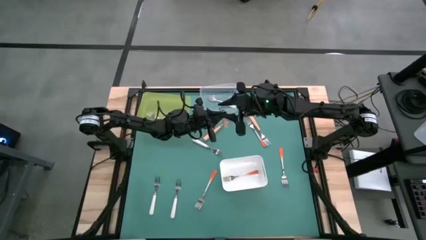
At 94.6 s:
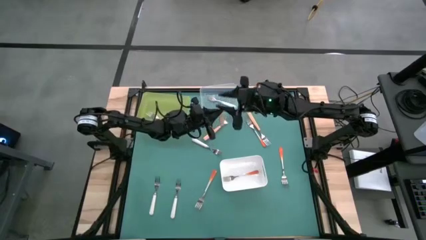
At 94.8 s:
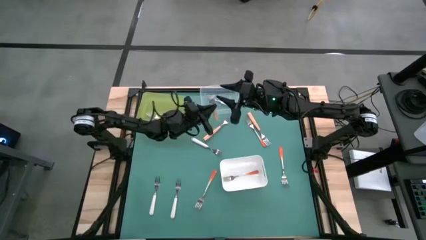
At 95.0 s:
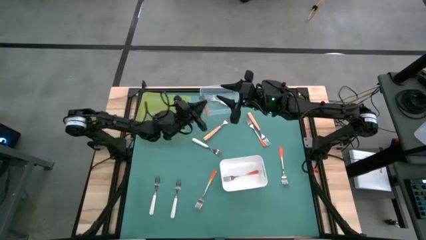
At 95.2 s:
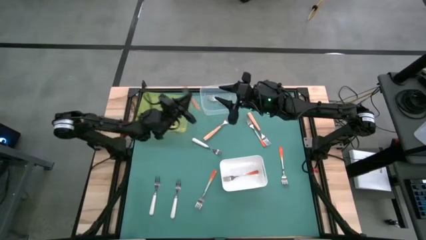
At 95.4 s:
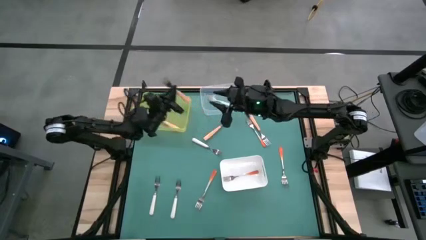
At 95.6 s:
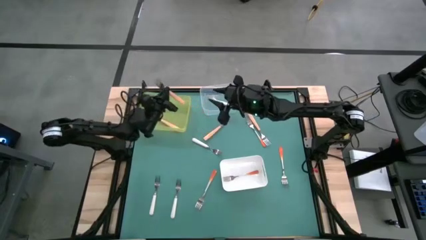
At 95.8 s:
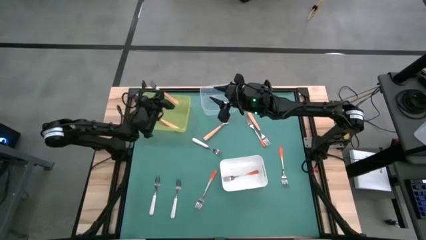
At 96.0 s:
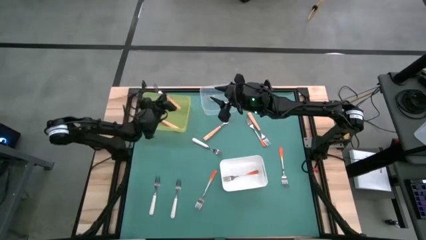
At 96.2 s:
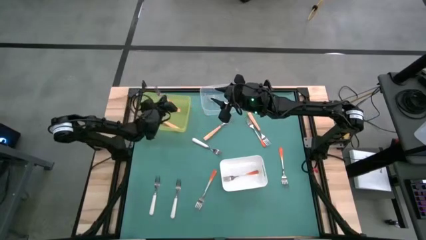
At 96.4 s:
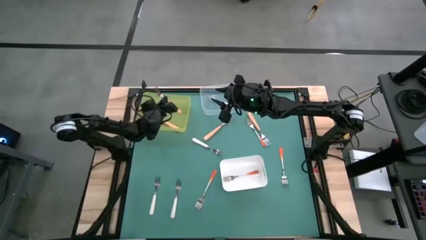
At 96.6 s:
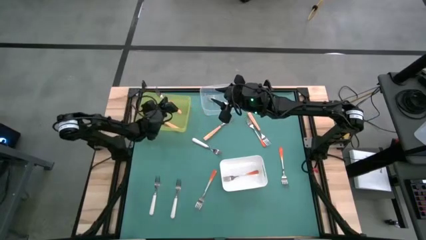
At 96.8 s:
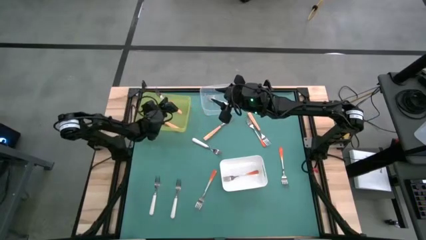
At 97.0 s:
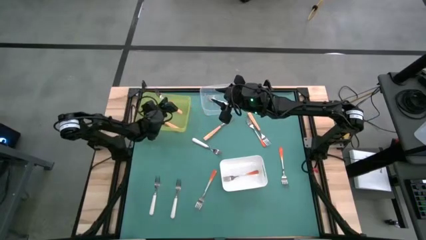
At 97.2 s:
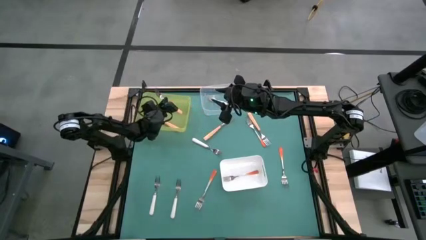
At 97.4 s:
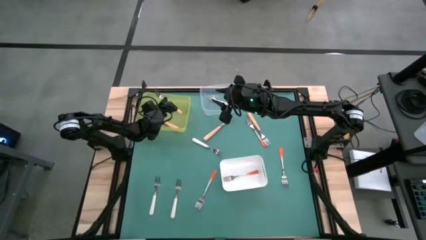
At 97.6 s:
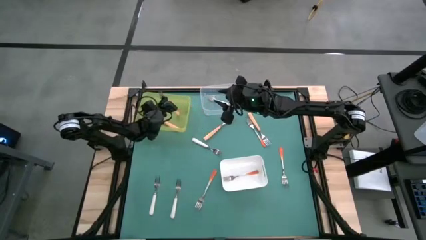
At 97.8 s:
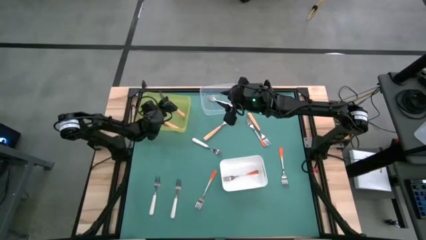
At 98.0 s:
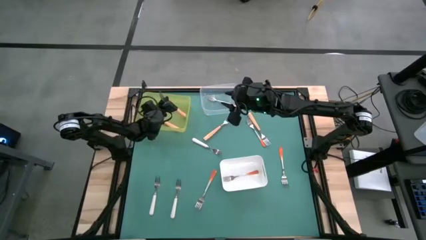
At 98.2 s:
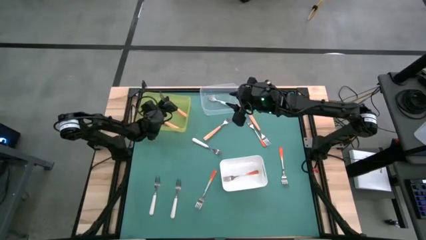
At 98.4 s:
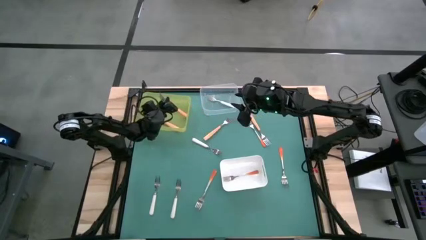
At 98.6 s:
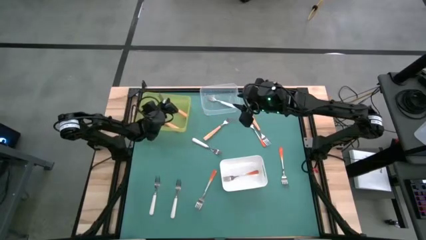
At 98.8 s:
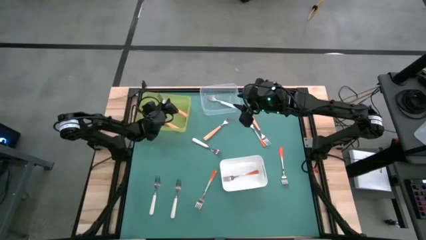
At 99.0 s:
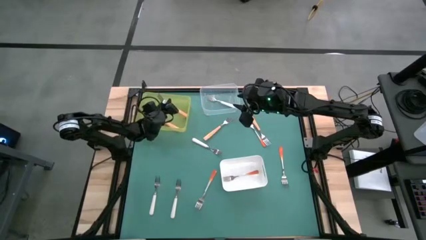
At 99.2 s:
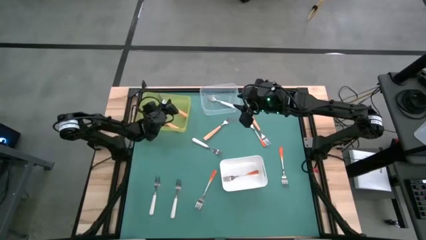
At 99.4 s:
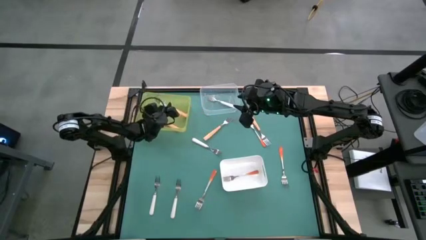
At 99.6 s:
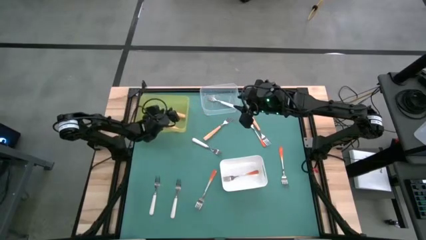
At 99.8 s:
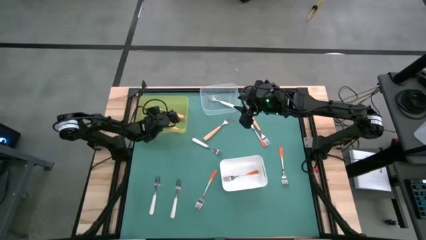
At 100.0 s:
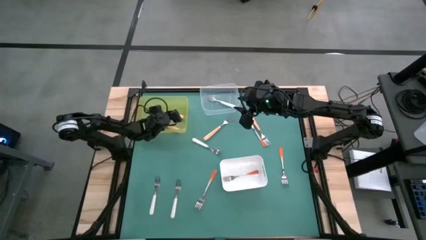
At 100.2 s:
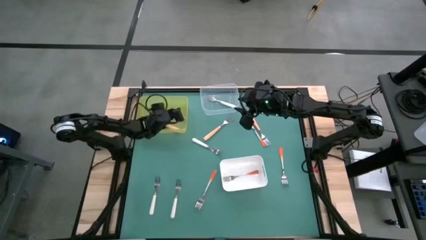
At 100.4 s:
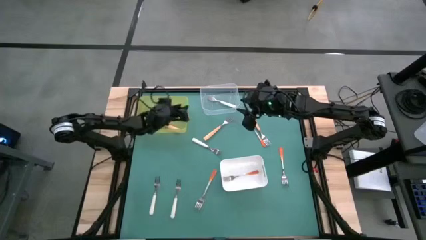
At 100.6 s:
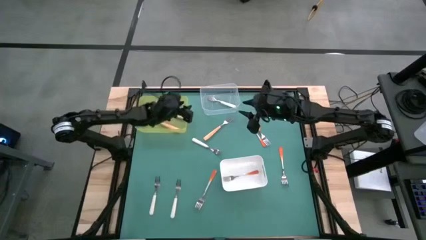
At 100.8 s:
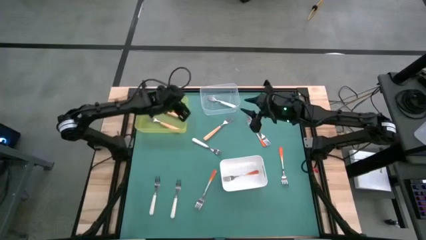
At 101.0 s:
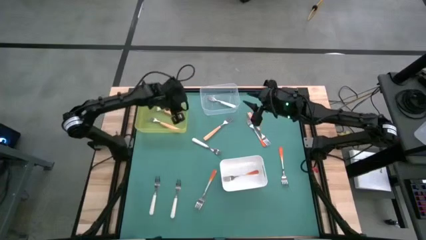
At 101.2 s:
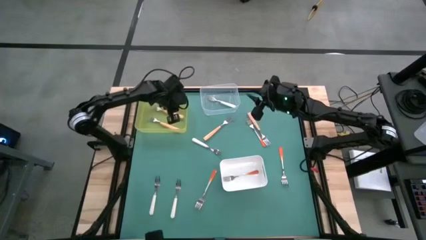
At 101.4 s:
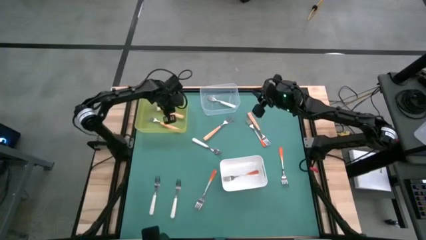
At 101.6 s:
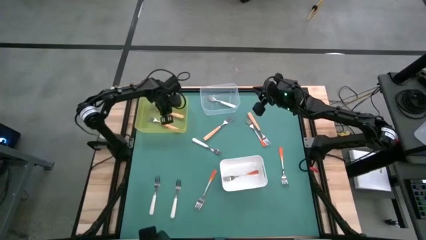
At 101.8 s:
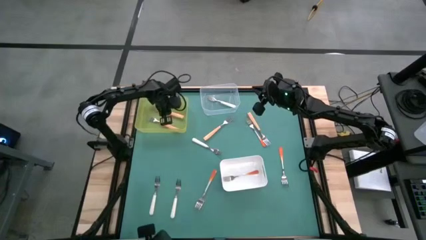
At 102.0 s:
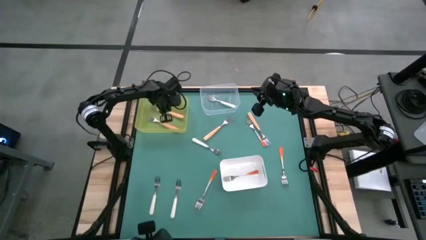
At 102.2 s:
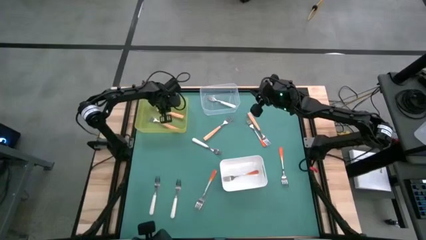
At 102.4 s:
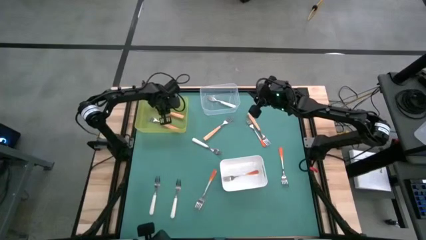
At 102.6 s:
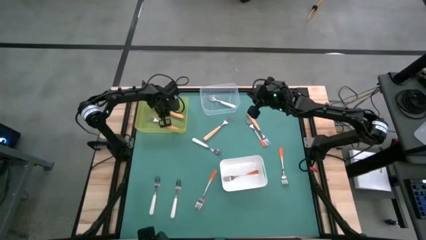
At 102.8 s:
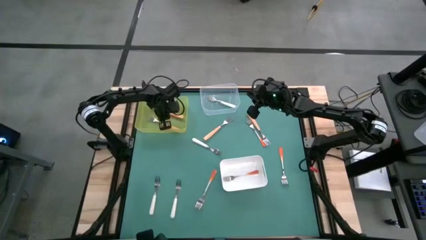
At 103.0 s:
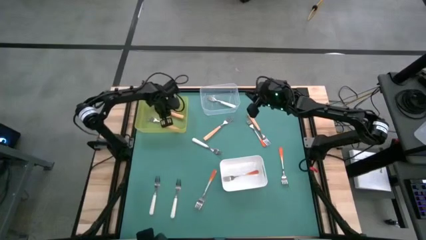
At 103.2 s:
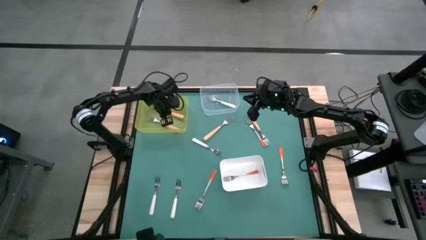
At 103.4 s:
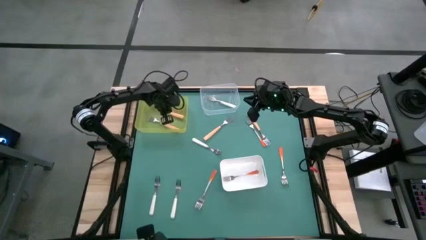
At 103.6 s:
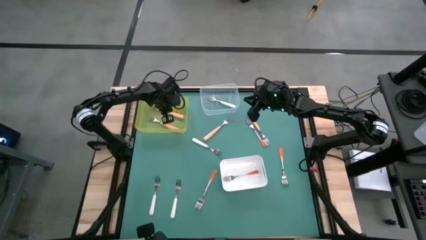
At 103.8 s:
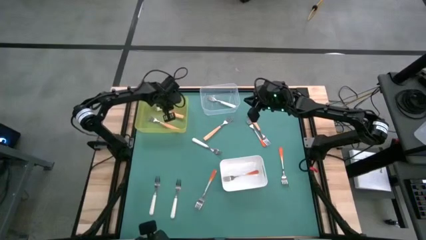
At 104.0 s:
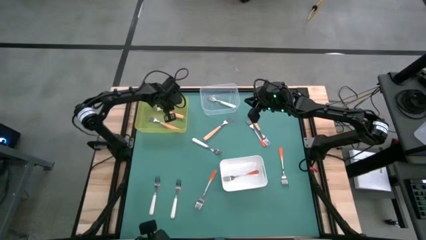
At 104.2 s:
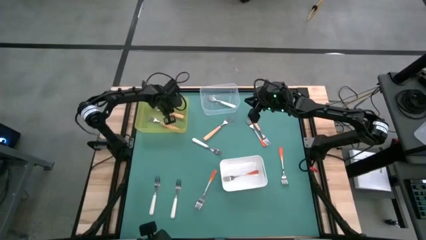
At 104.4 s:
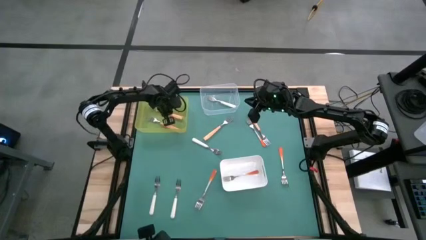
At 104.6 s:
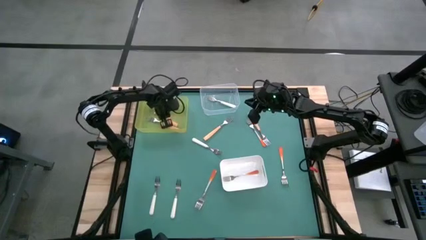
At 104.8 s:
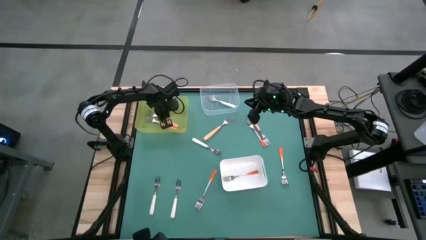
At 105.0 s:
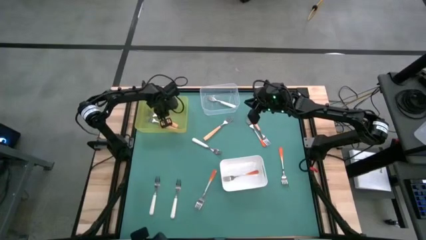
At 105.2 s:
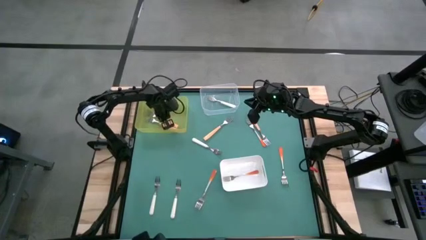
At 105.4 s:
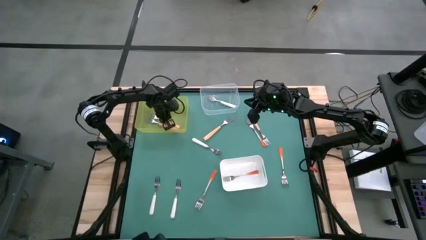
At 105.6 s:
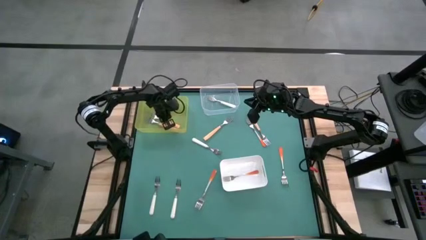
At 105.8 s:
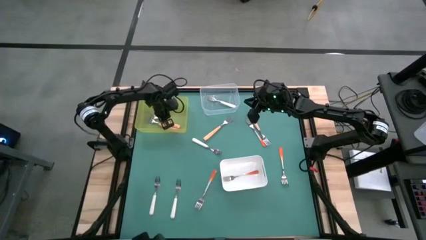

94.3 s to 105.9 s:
Task: Sort silverware by color (type)
Put the light orange into the yellow bin

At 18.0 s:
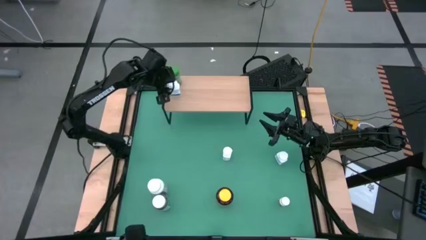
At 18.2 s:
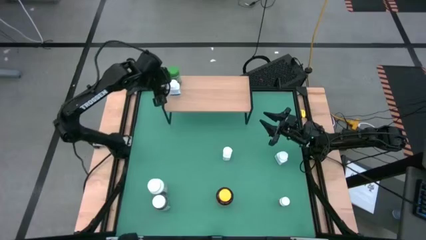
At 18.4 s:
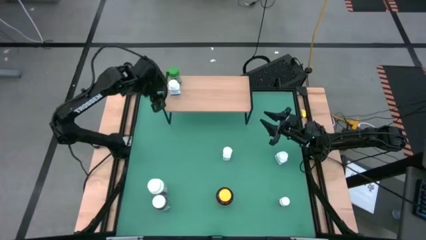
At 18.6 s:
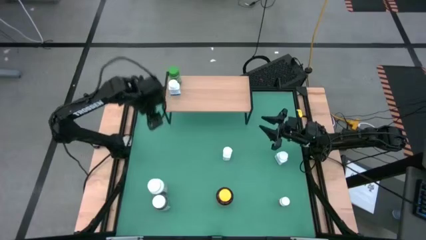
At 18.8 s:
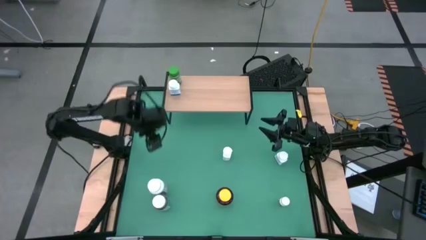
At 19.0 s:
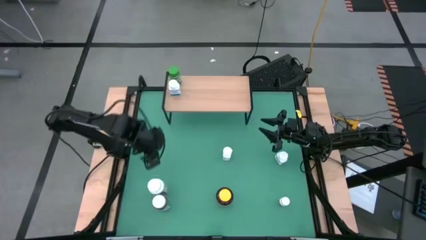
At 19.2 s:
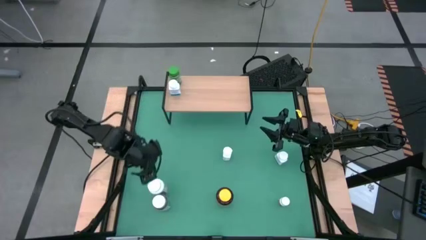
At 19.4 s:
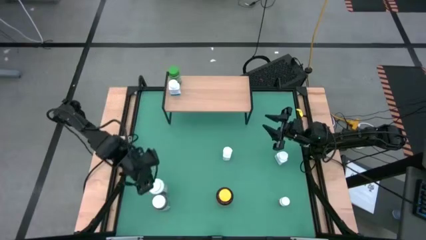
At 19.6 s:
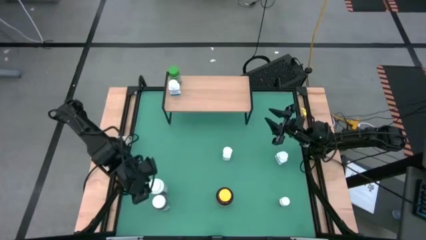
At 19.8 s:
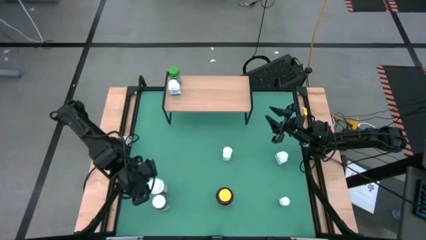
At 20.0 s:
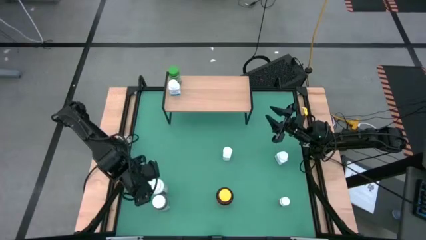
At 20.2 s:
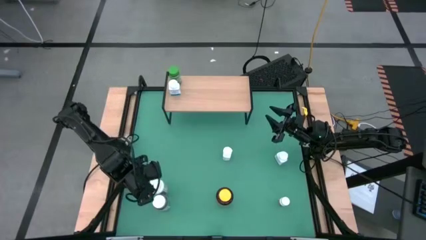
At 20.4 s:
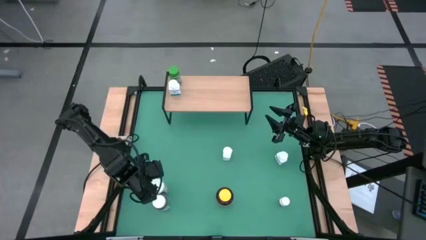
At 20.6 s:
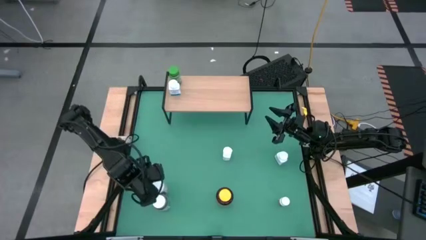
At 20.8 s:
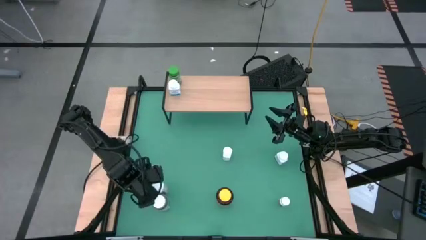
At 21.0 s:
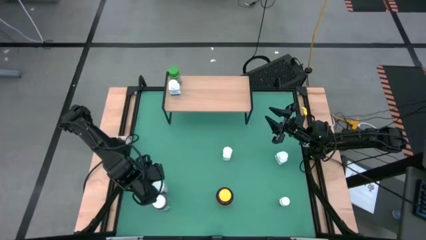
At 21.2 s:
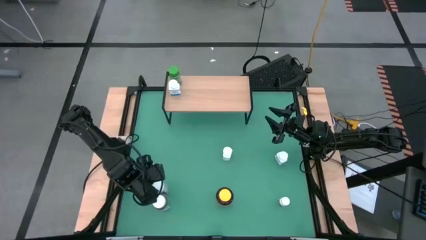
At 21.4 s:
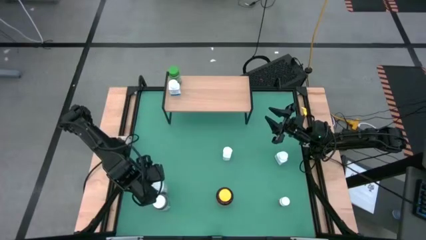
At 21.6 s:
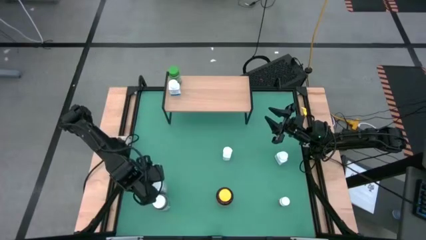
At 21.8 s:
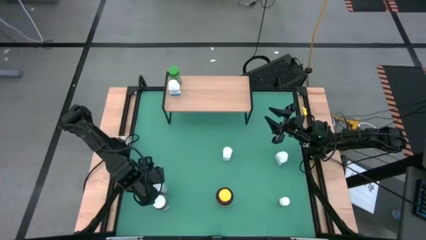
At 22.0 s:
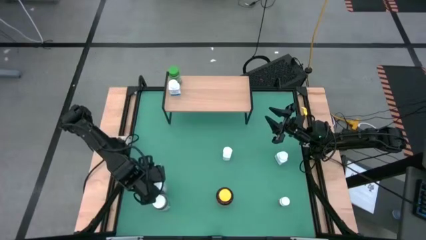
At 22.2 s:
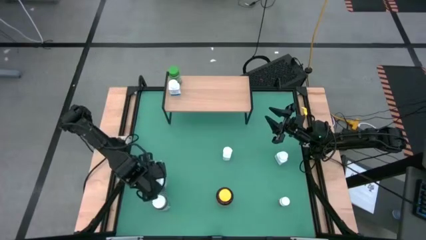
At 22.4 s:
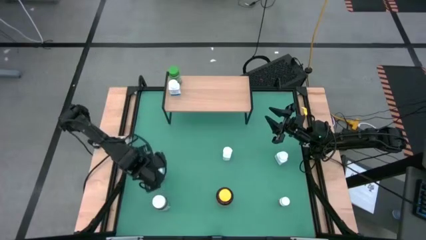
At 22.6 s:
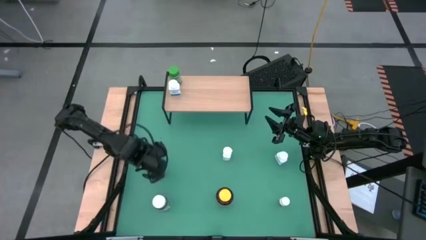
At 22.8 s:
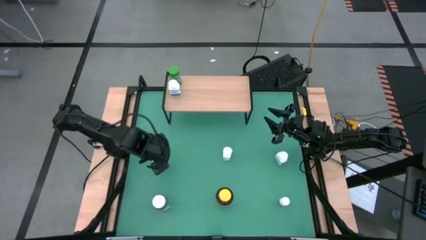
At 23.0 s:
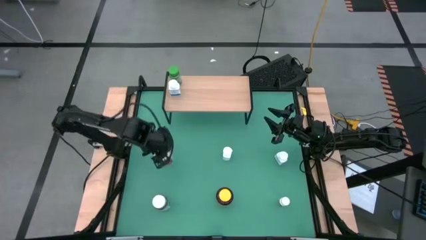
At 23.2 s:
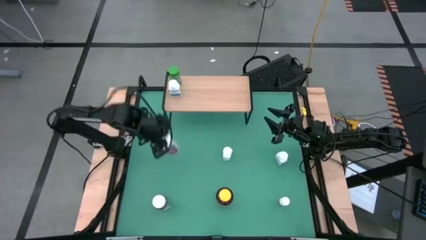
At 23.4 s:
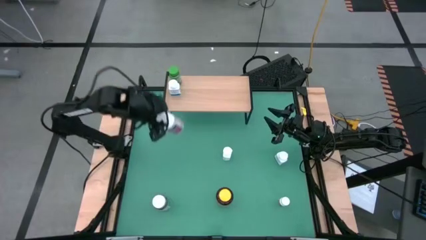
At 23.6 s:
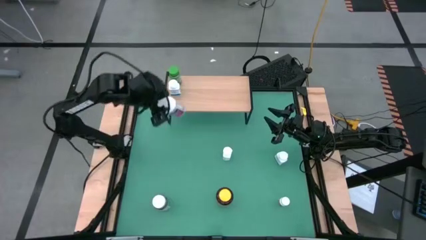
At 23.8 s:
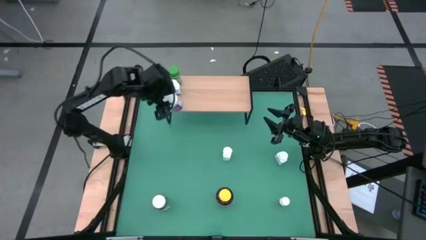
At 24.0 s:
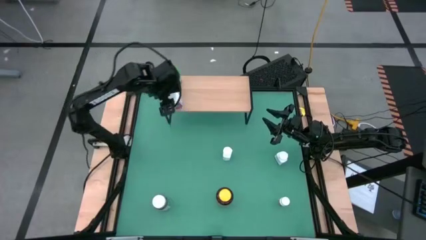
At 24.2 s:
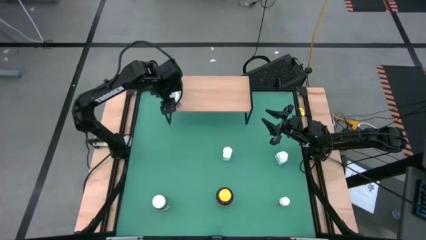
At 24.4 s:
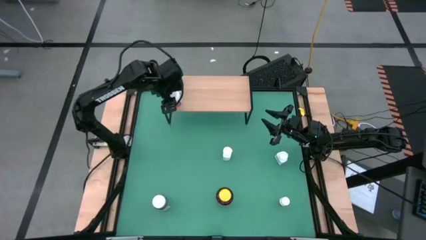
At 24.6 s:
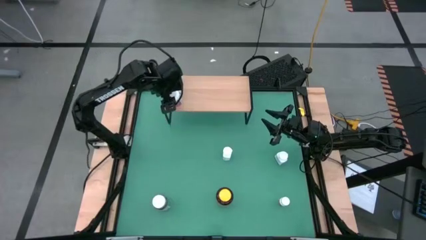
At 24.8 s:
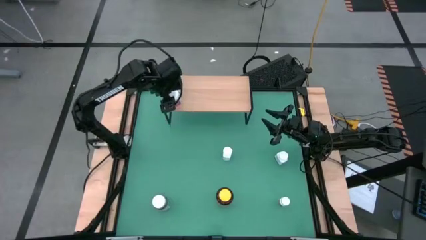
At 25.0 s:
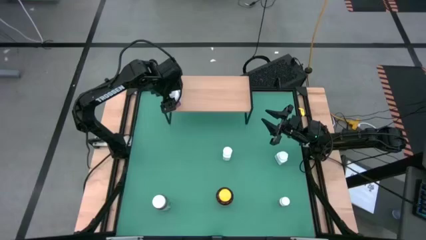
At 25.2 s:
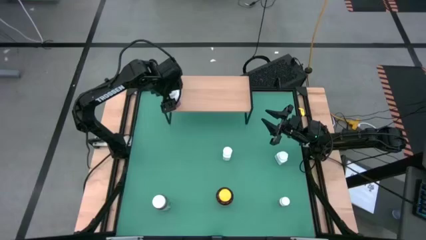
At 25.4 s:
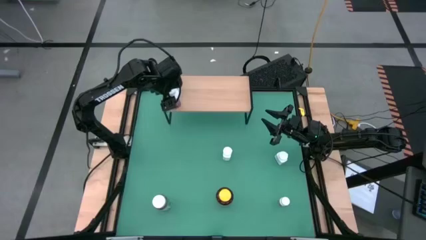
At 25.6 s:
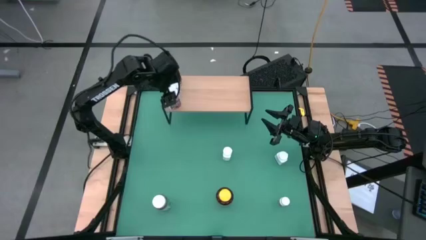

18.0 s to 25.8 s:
Task: Pick and place medicine bottles onto shelf by color
Put the middle left white supplement bottle on the shelf
